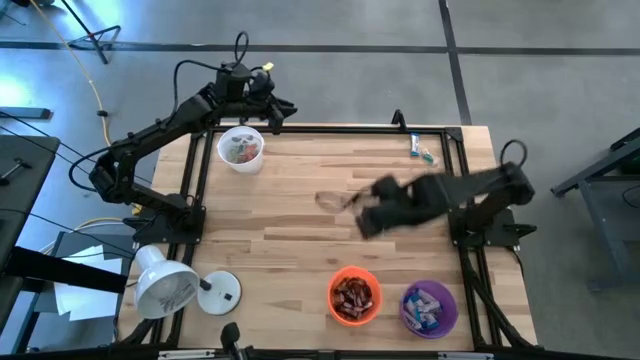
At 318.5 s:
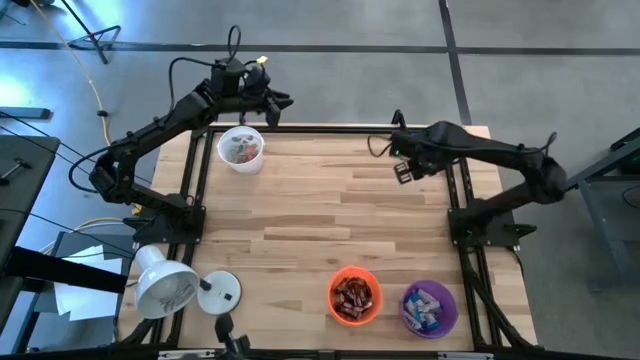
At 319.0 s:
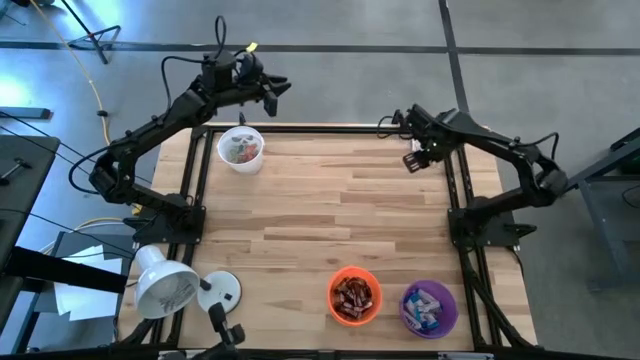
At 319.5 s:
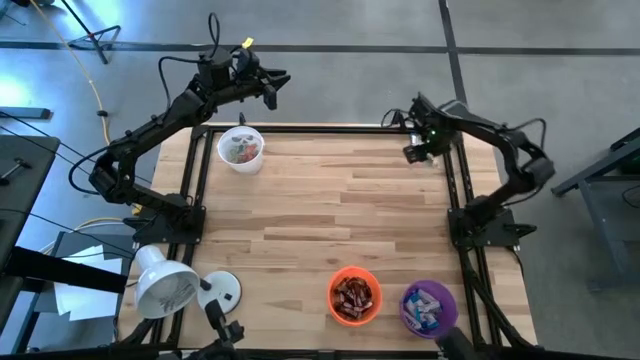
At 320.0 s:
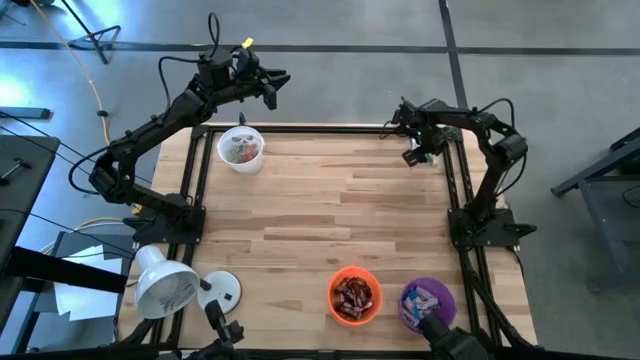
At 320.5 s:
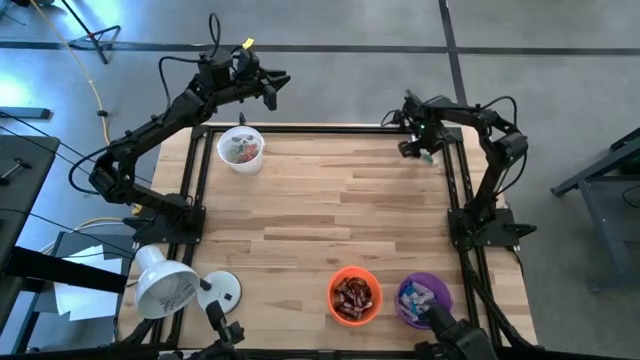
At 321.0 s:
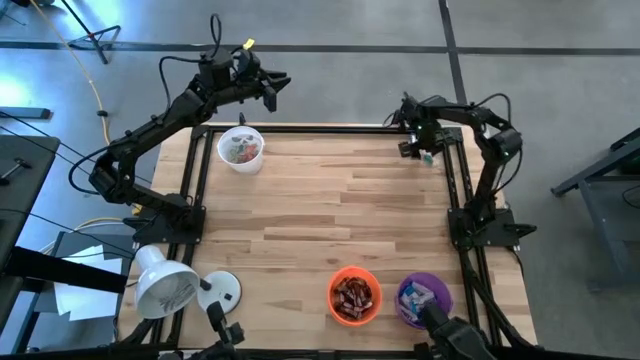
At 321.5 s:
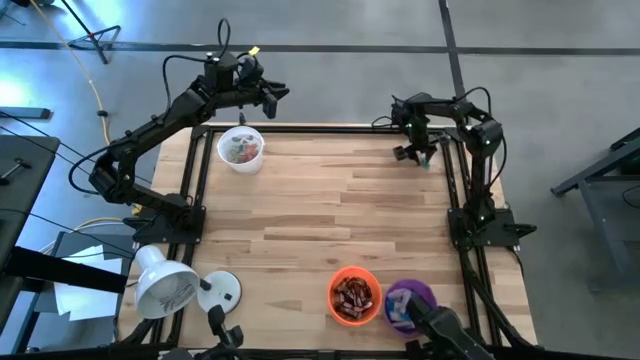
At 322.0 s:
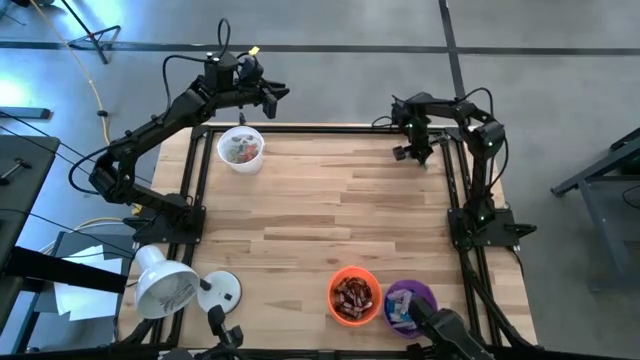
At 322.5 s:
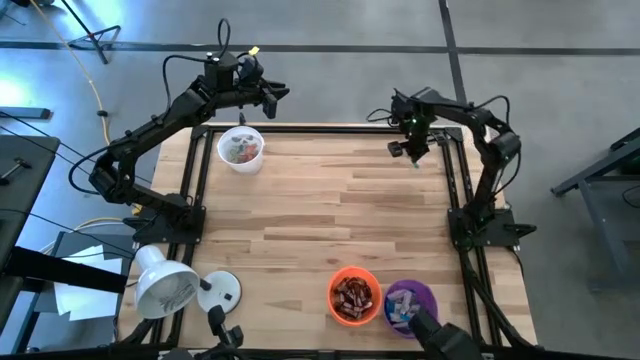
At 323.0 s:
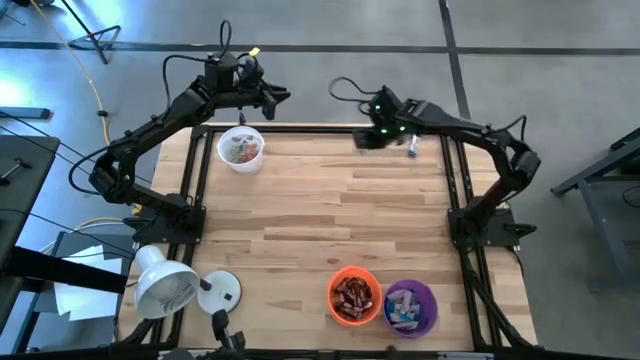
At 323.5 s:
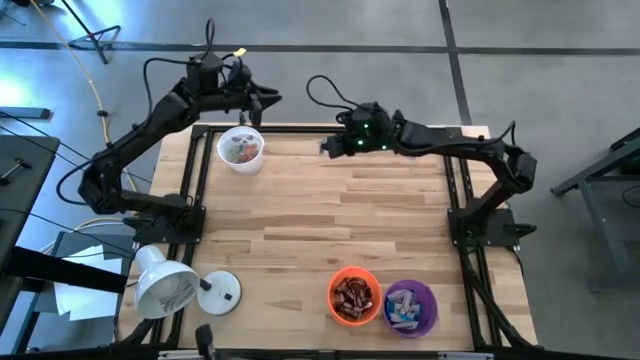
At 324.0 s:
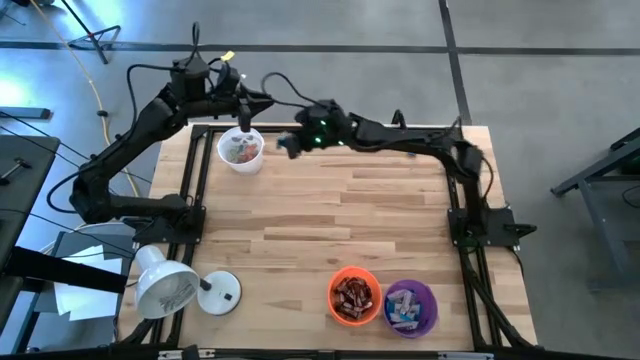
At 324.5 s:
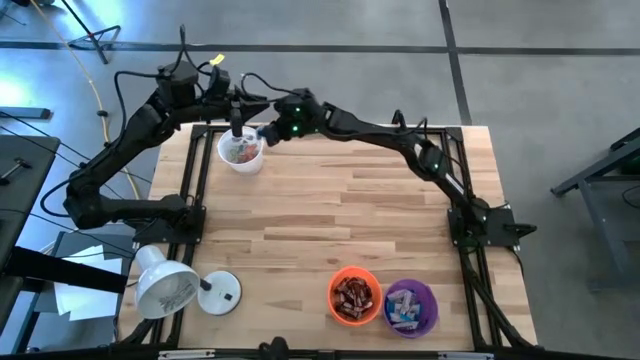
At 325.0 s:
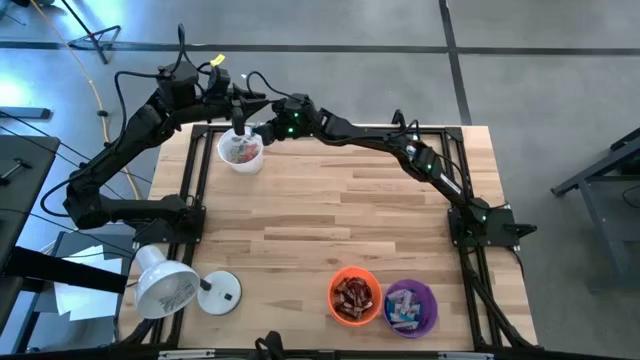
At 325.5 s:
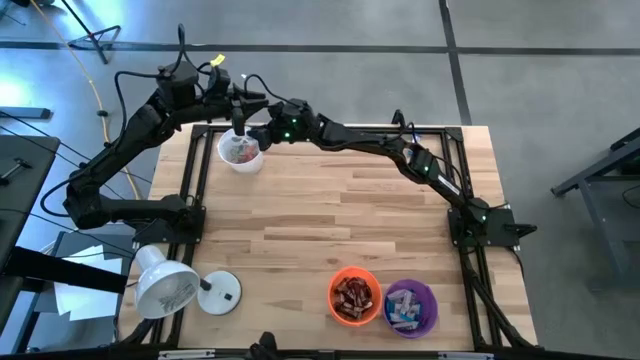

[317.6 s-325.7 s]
Task: Organize candy in baskets
Put the blue gummy into the white bucket

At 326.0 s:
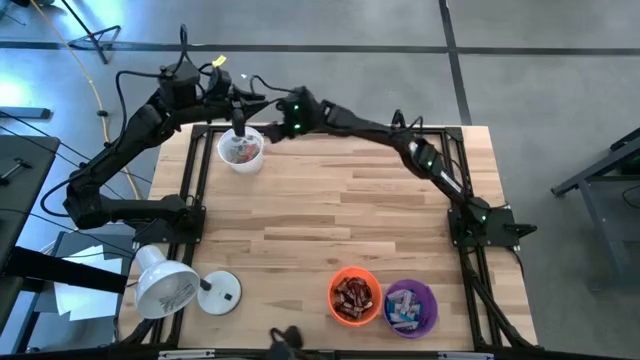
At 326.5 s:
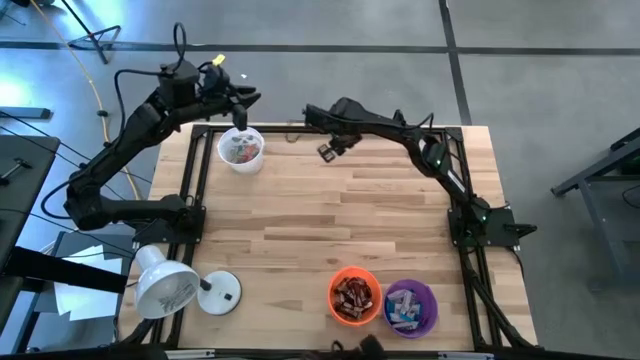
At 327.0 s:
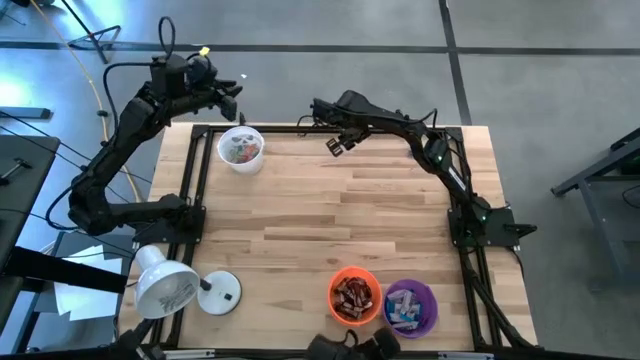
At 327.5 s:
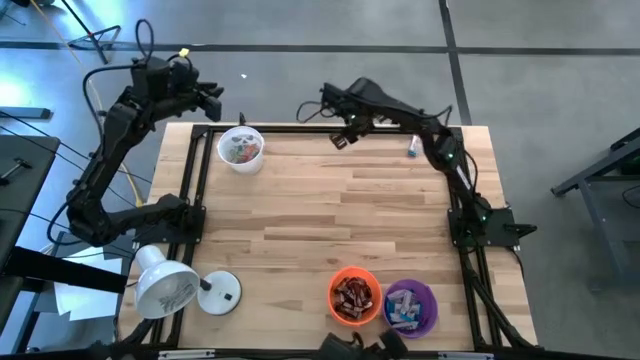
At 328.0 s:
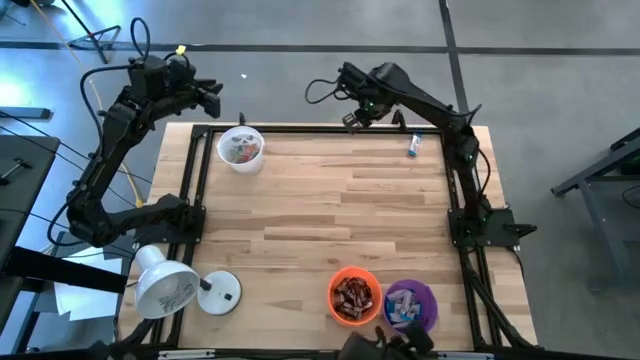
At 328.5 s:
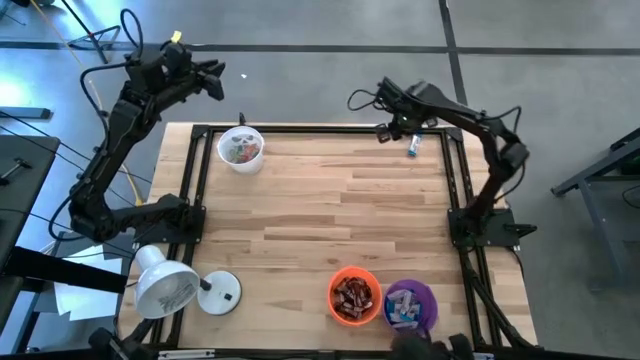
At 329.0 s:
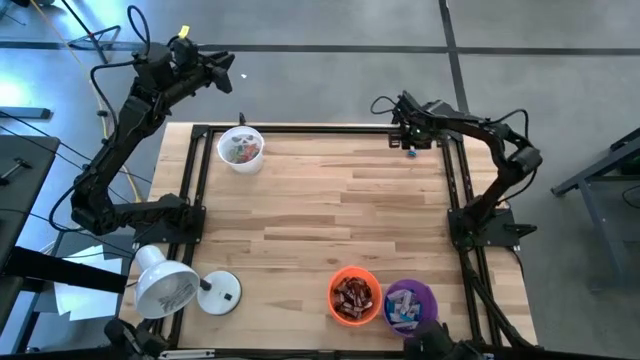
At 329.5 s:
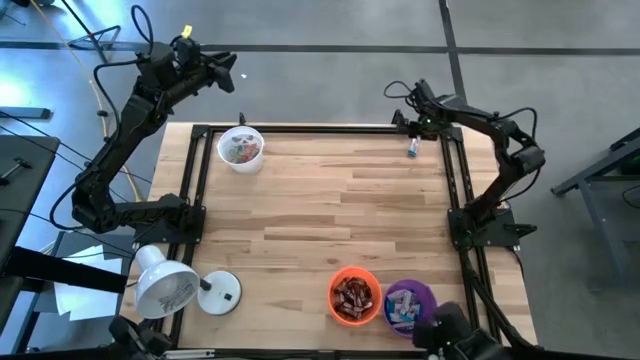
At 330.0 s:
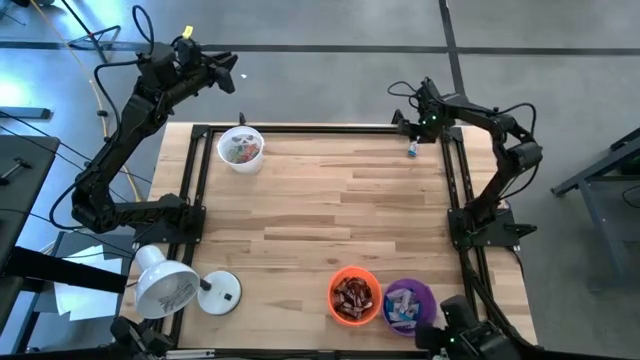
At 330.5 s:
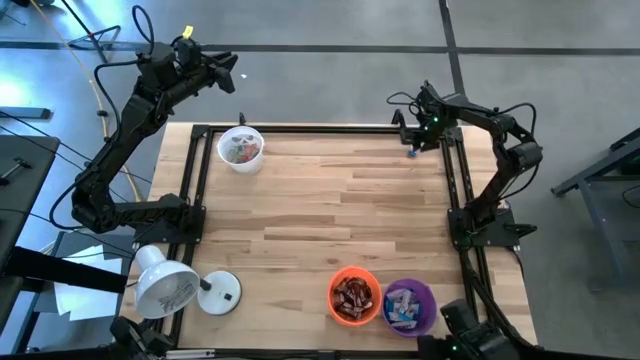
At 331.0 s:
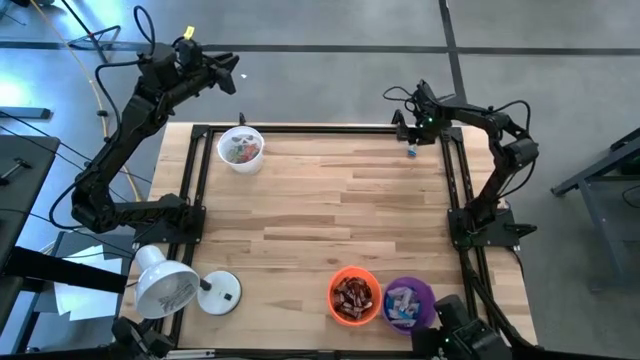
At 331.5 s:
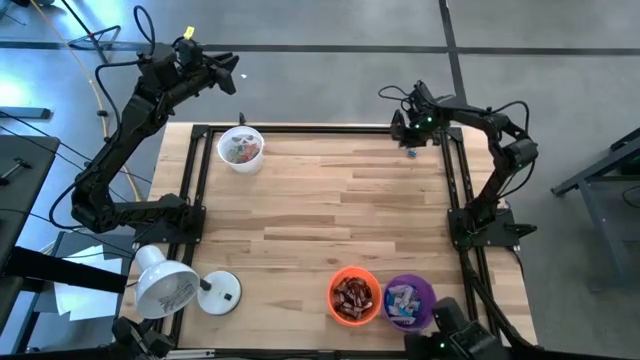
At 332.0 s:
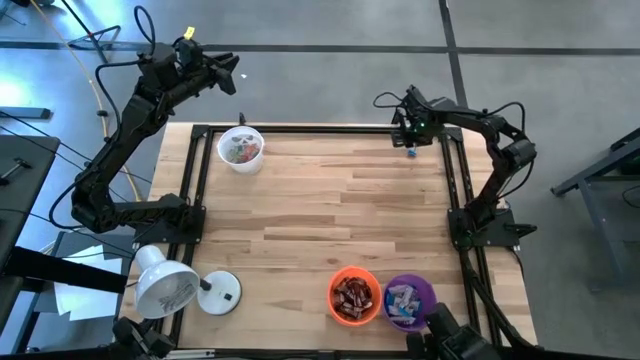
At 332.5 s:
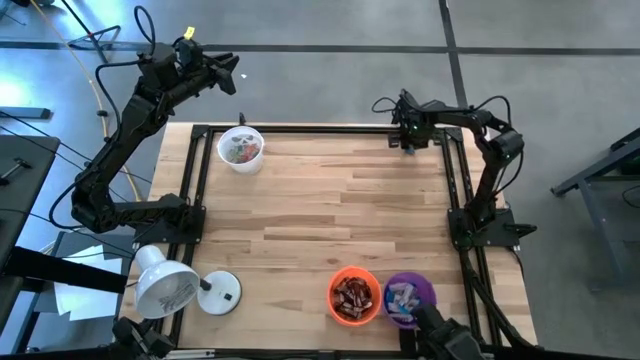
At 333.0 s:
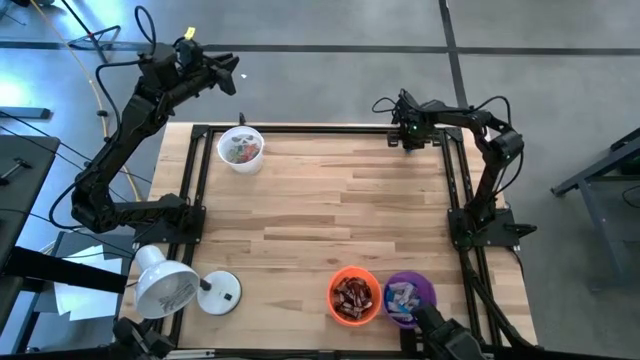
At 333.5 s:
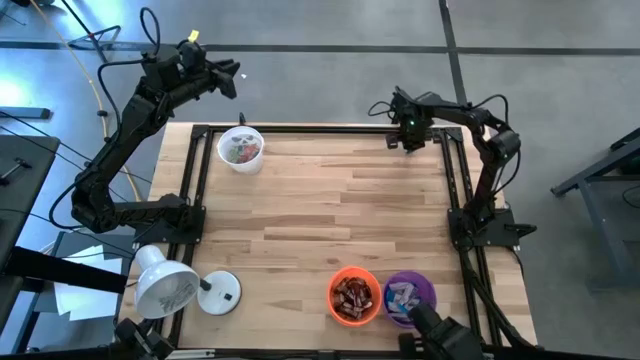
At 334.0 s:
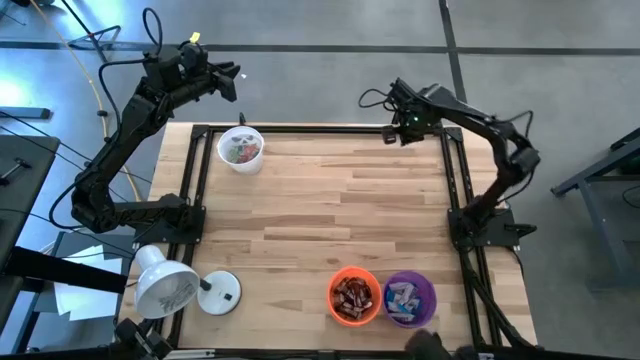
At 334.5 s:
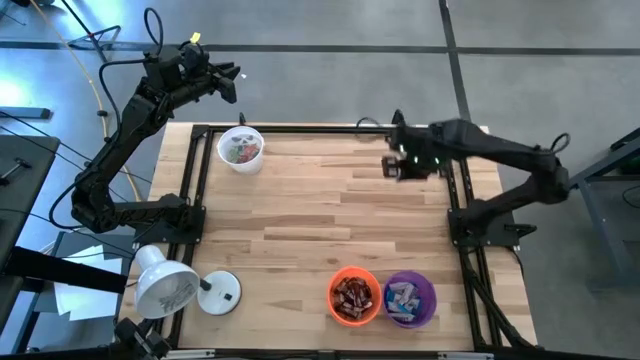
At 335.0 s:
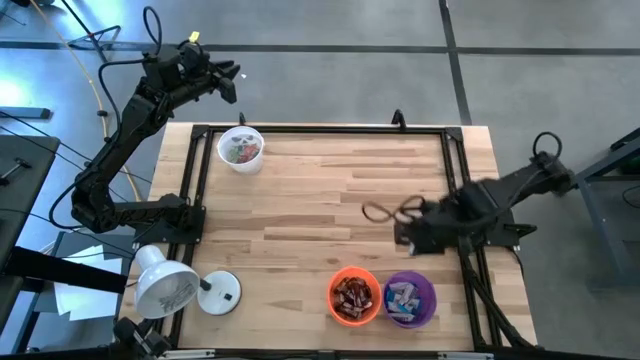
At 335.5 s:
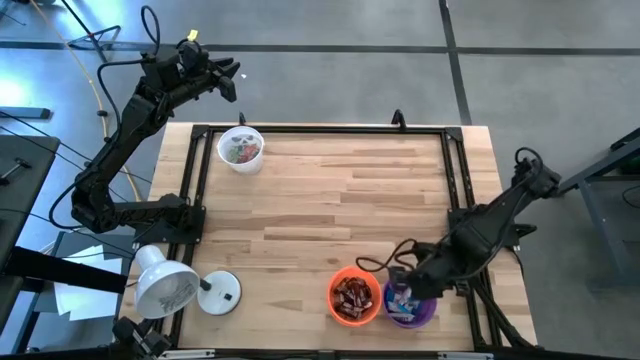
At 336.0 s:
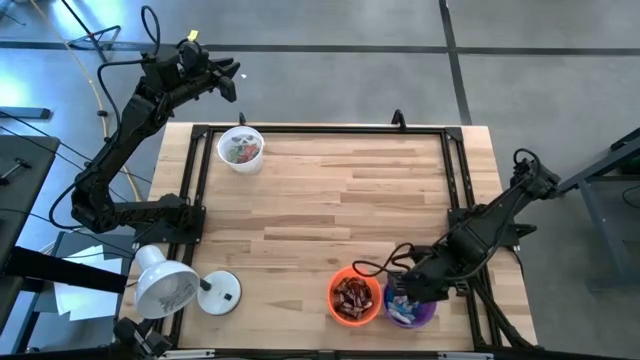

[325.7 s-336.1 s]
Put the white chocolate into the purple bucket

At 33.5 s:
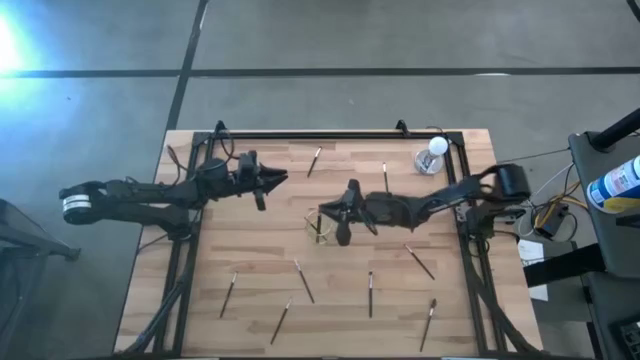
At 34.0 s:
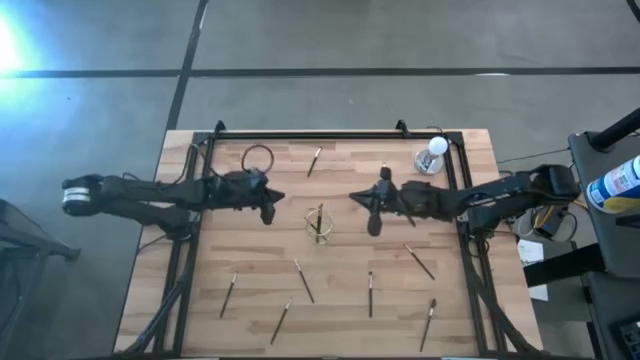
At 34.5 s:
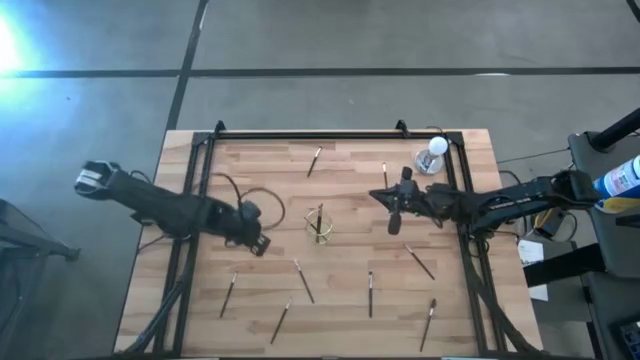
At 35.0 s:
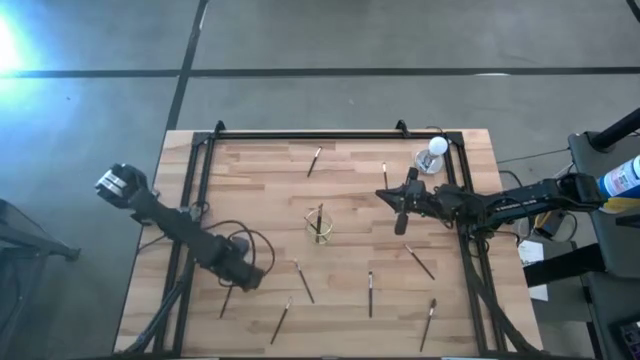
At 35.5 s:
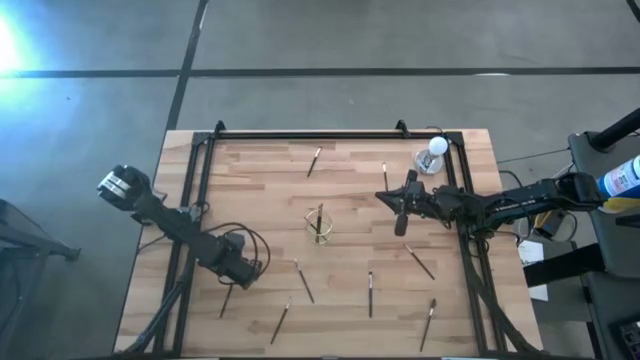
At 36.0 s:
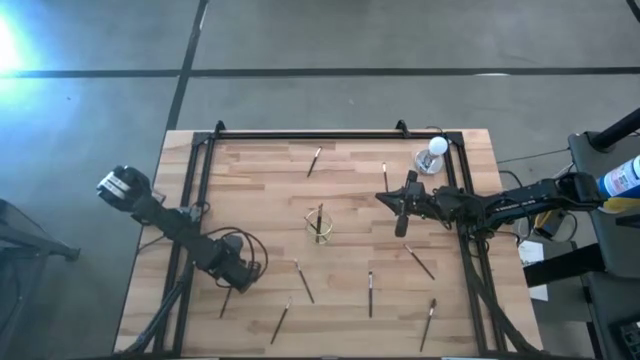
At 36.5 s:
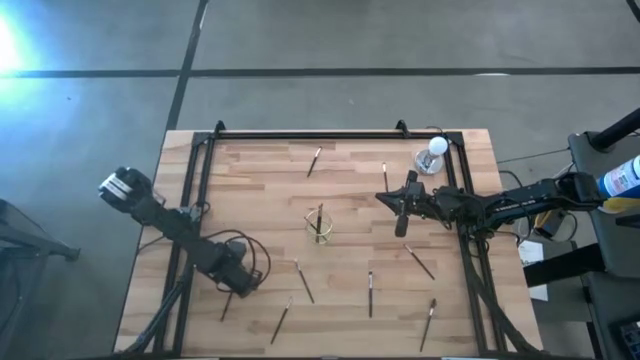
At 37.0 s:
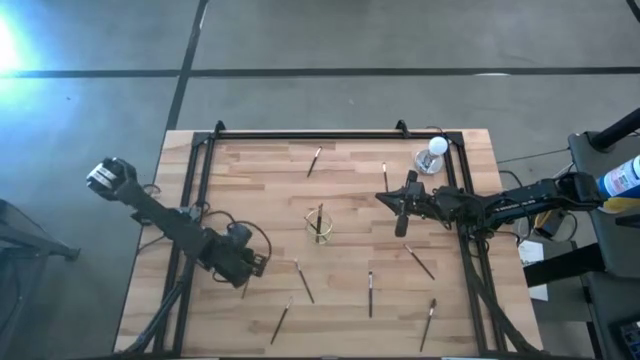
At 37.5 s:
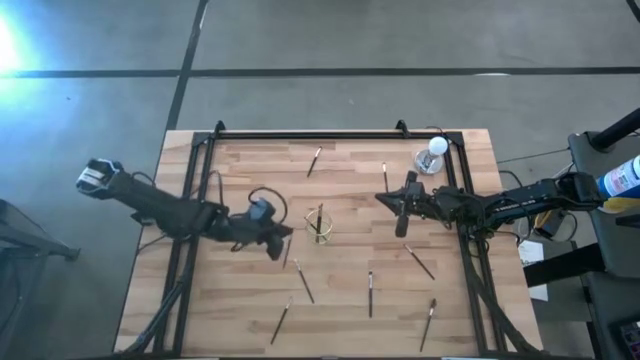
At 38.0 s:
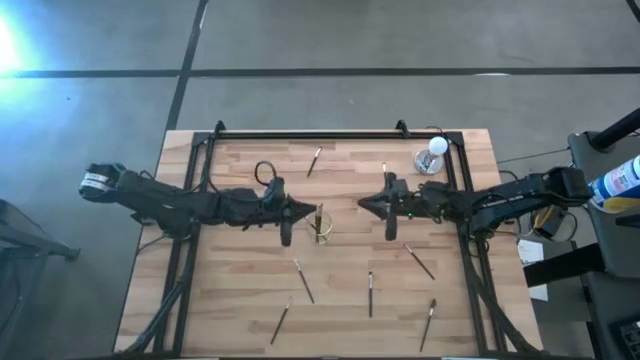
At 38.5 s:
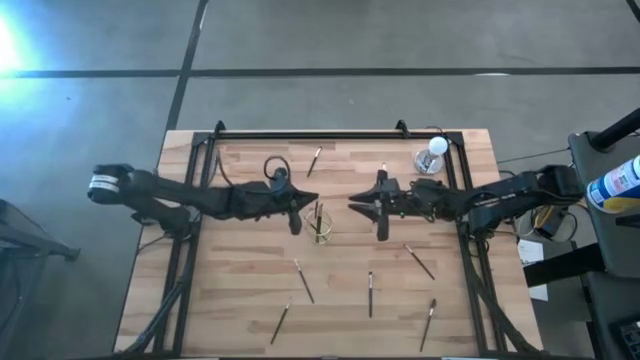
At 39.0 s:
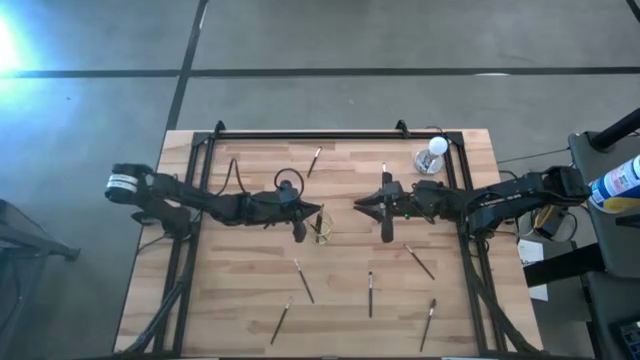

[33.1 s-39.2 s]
Task: Pick & Place Makeup Brushes
Put the eyeshadow brush into the gold makeup brush holder
